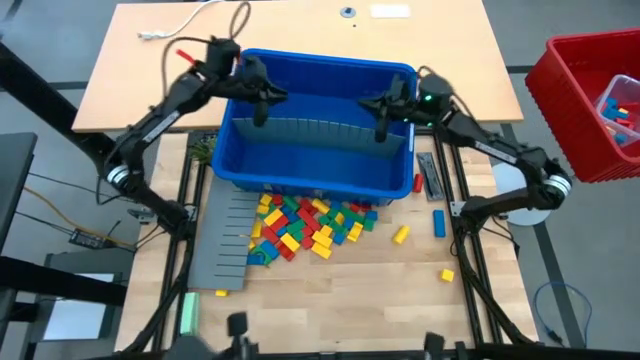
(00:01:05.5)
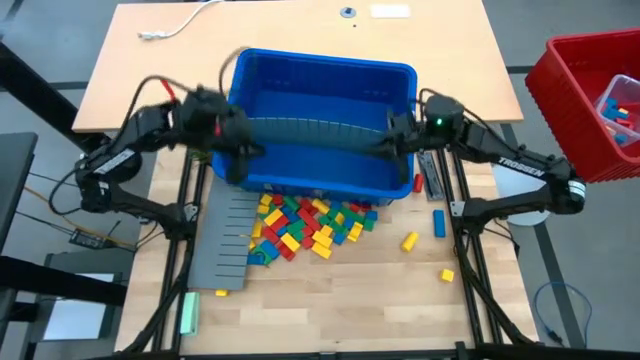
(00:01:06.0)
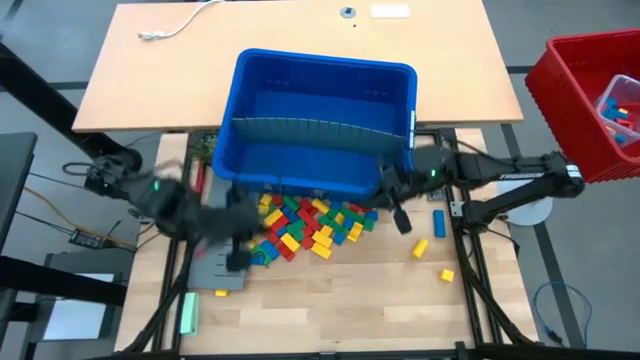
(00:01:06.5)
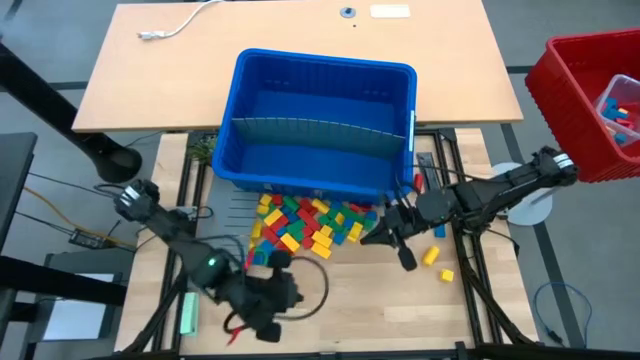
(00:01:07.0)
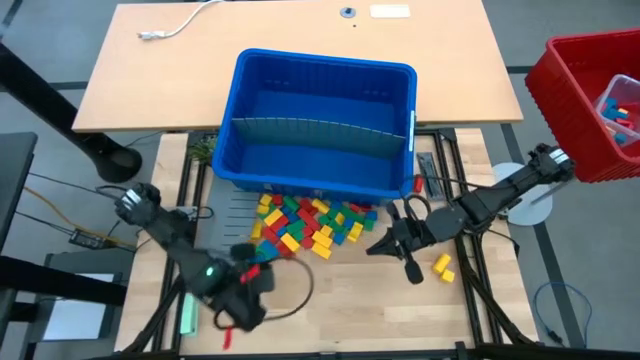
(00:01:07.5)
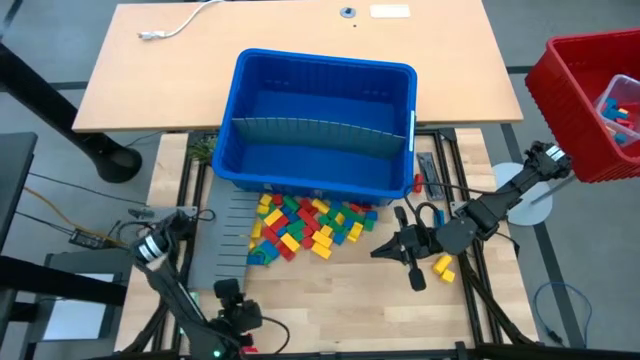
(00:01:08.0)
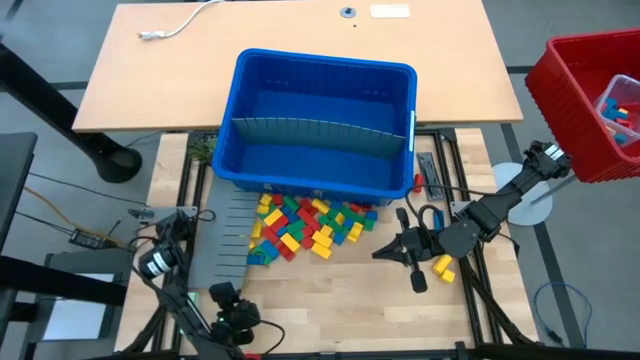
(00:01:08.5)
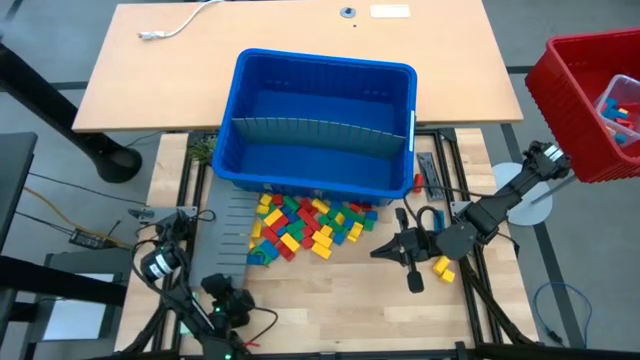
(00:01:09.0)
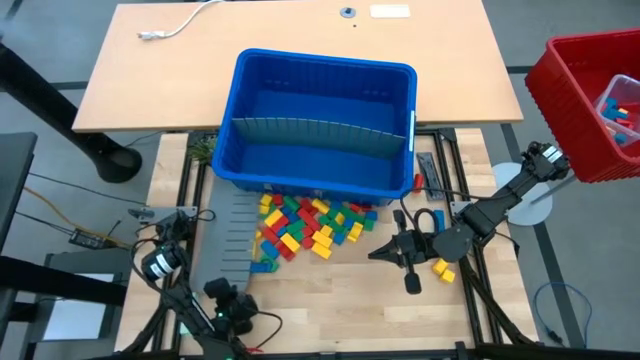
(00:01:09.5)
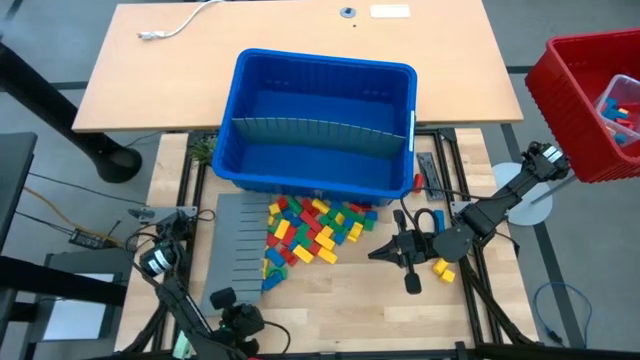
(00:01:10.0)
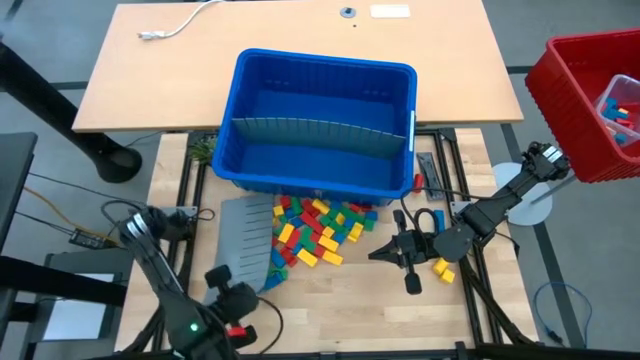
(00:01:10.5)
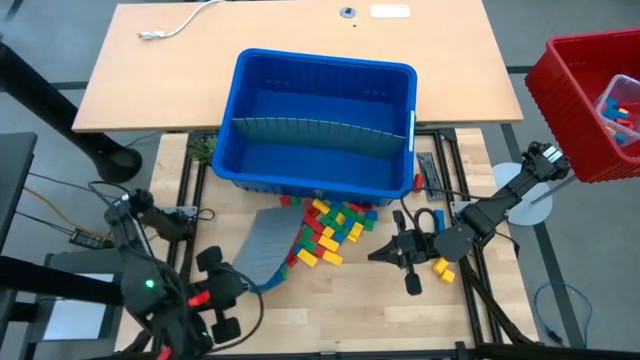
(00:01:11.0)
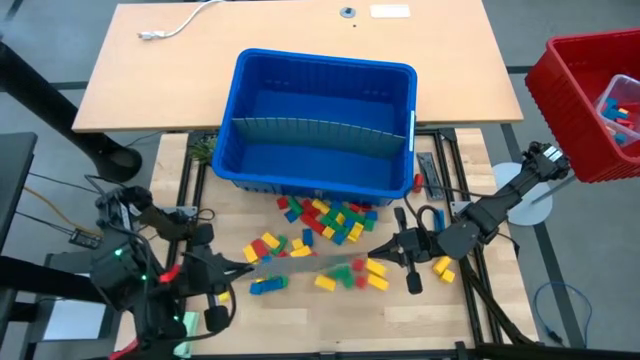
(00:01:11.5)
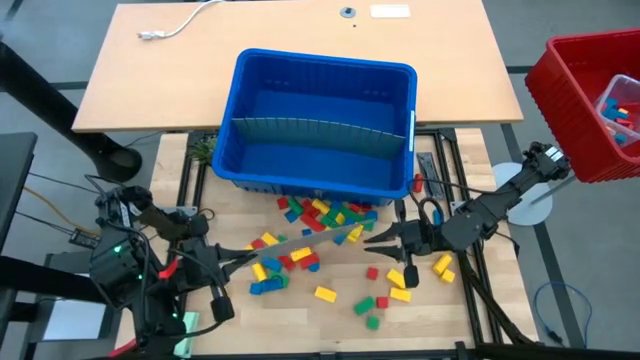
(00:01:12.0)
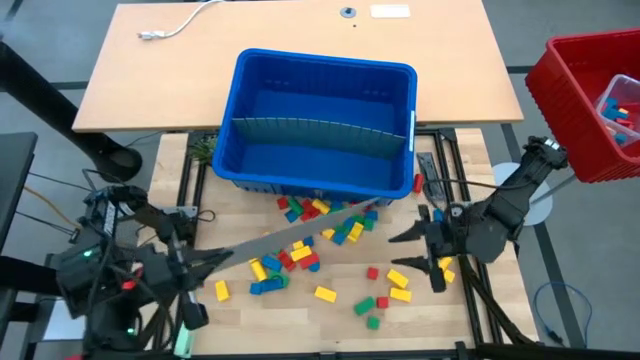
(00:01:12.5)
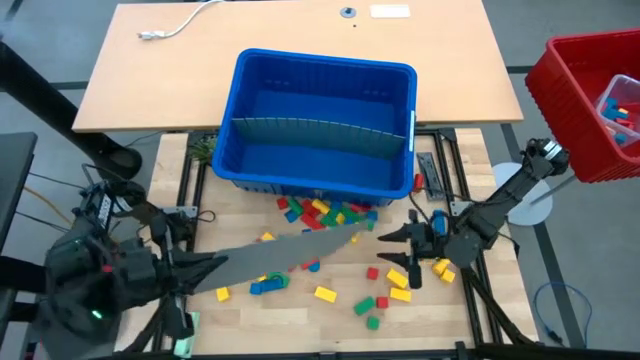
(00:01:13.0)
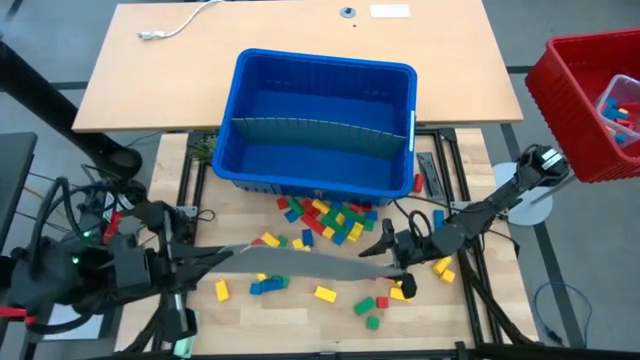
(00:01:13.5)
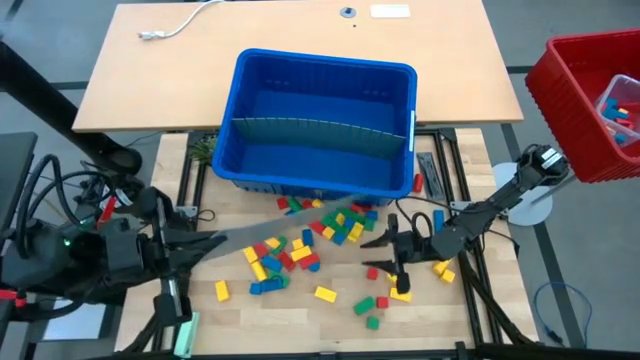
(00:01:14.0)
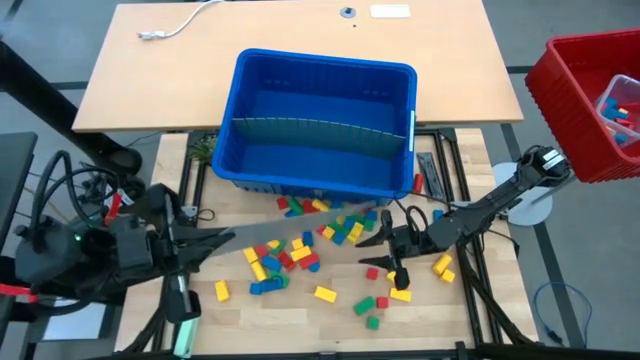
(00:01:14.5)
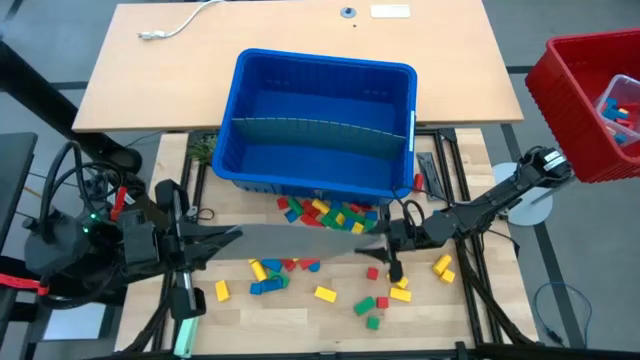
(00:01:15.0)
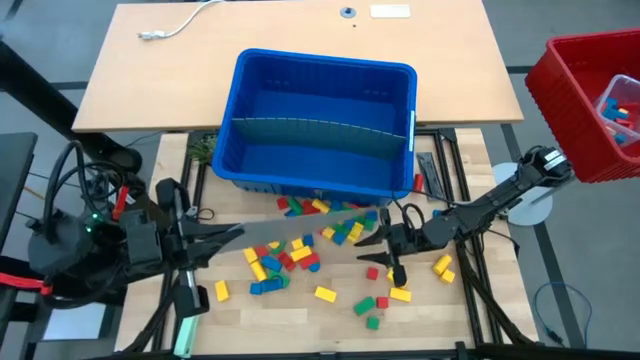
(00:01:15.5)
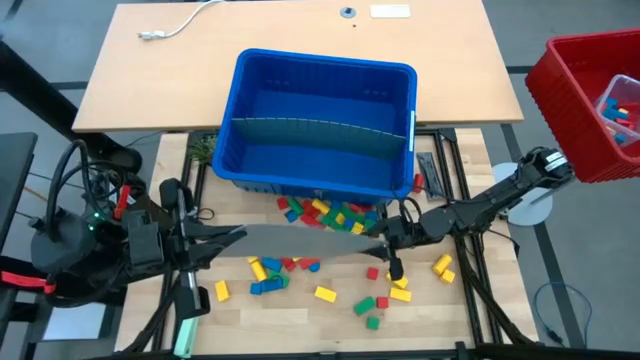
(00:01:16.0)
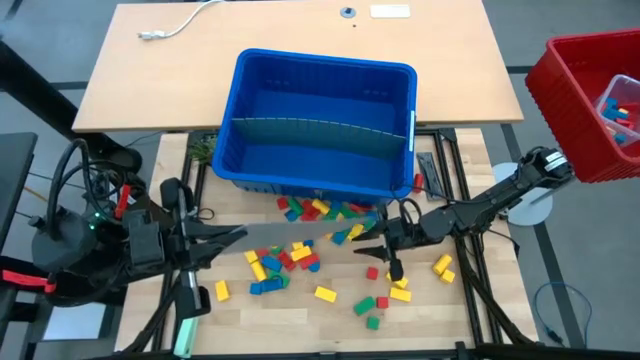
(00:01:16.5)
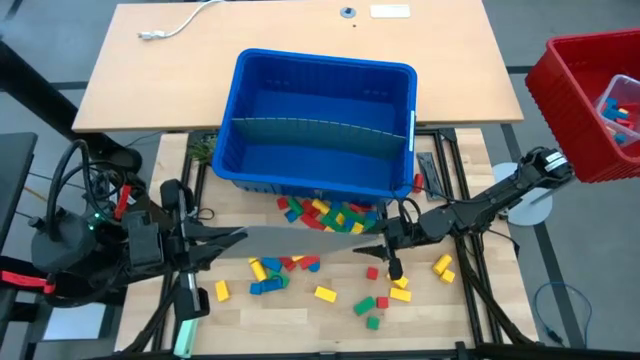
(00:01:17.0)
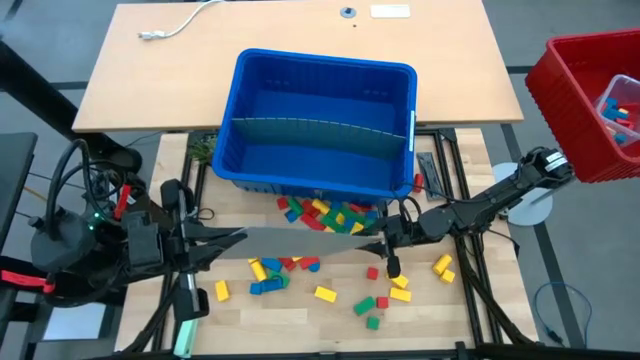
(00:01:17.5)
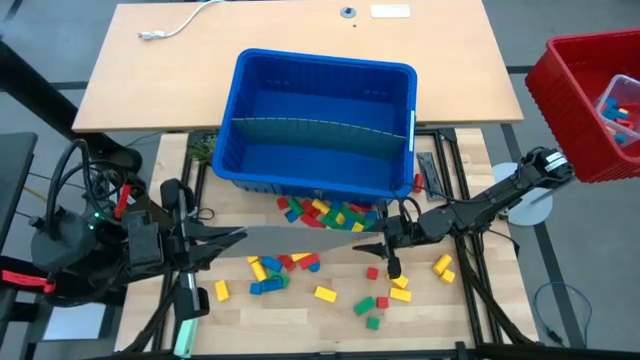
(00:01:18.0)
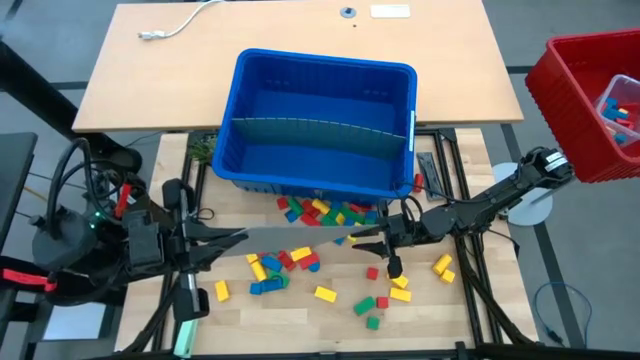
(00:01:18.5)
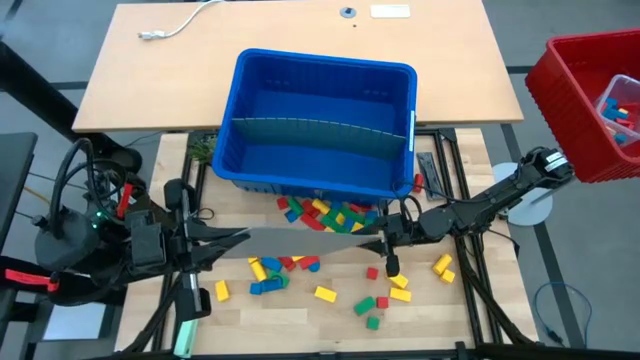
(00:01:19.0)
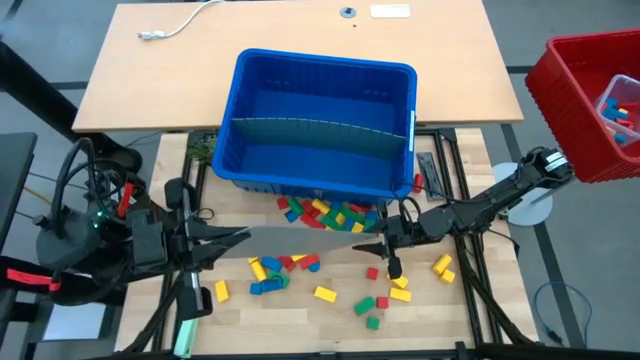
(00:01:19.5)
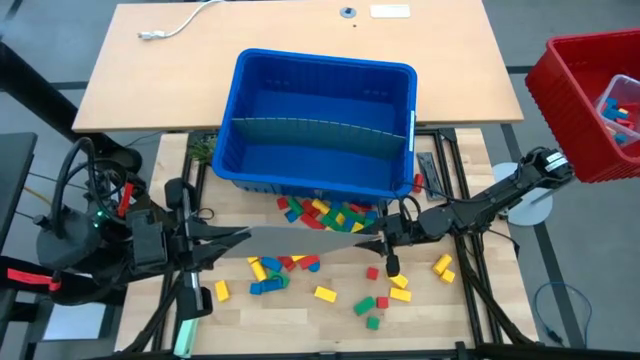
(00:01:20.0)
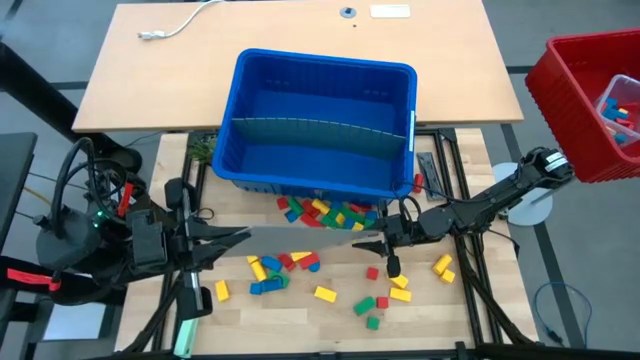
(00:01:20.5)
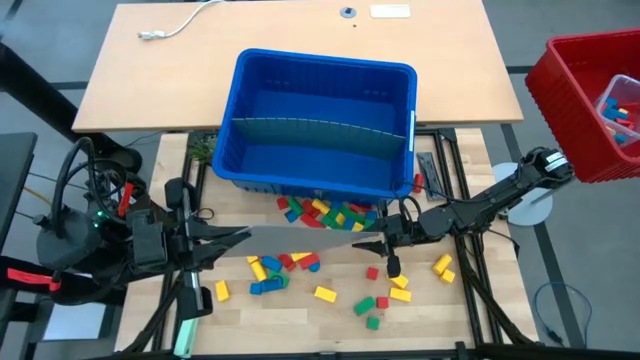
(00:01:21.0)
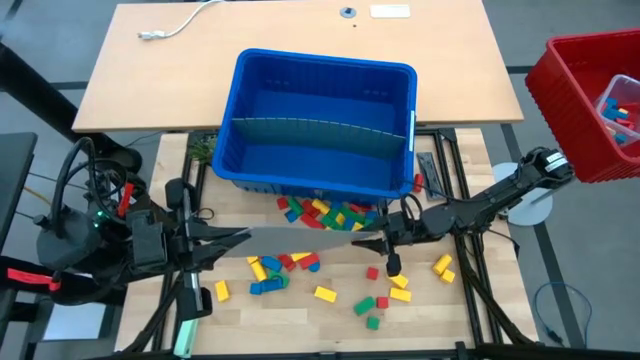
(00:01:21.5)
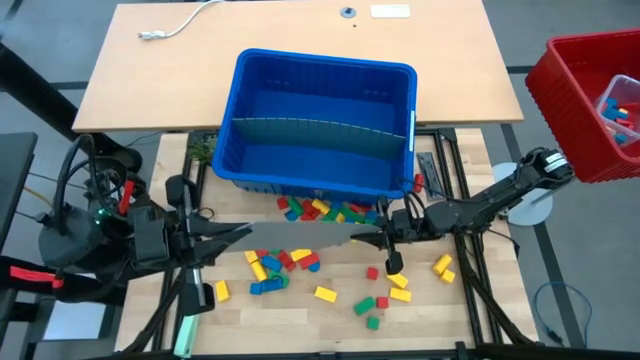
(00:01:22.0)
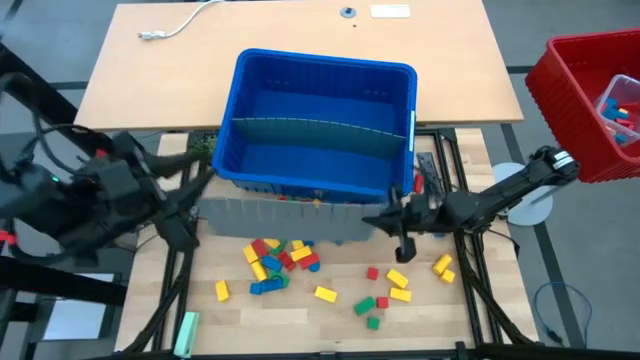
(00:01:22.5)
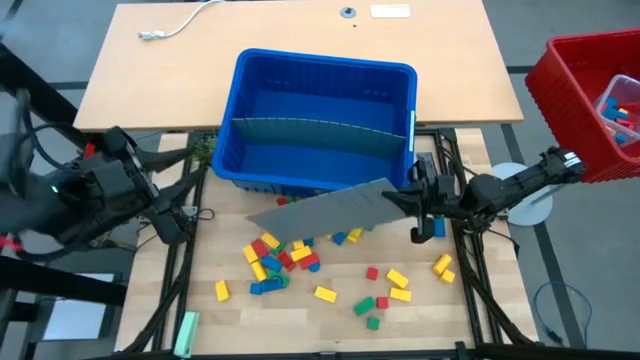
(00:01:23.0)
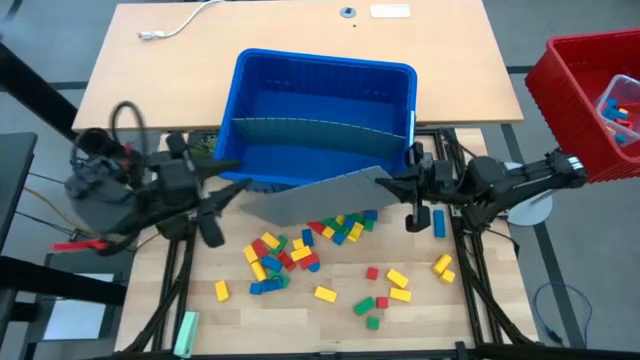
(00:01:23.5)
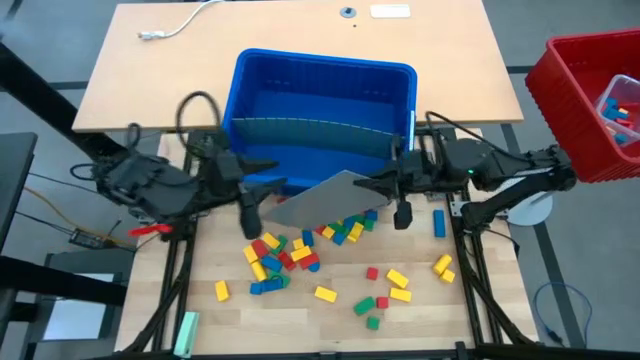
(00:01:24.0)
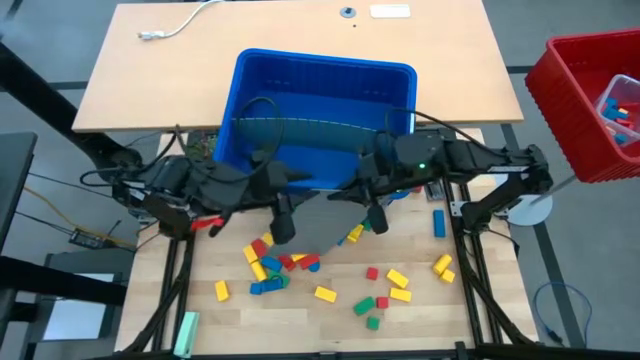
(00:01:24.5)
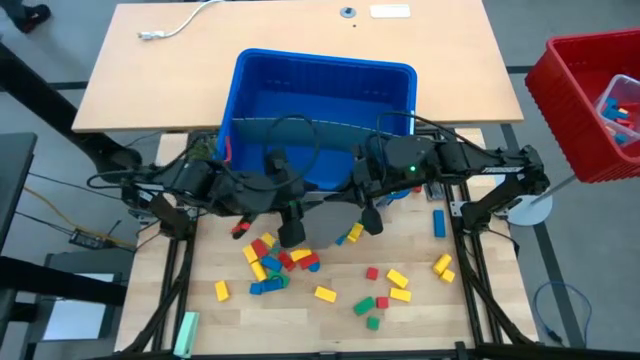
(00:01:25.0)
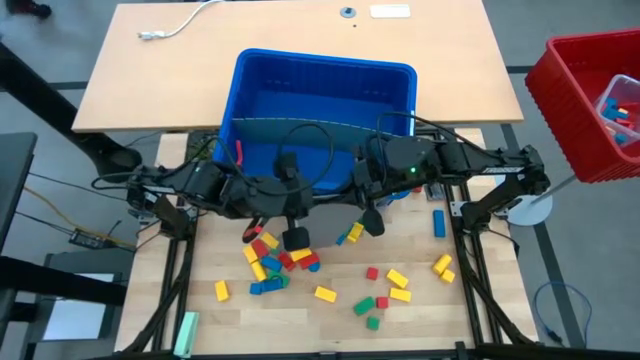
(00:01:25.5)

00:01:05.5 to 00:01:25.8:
Task: Sort blocks
Assemble the blue bin using gray bin divider
